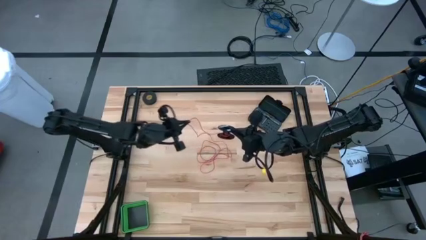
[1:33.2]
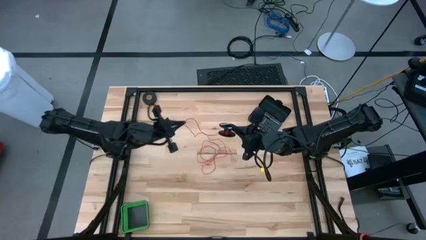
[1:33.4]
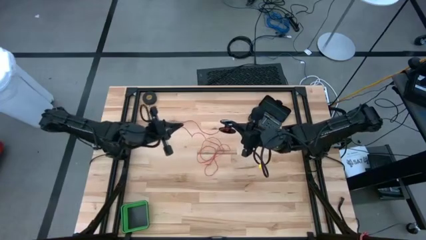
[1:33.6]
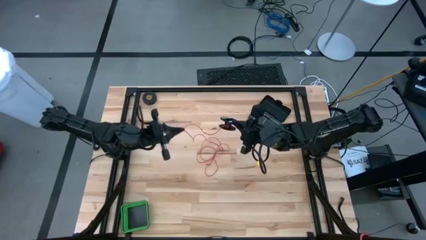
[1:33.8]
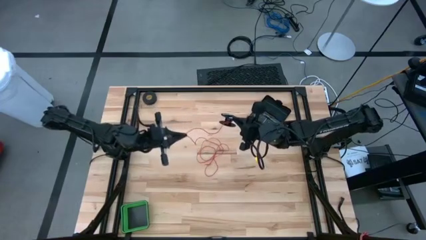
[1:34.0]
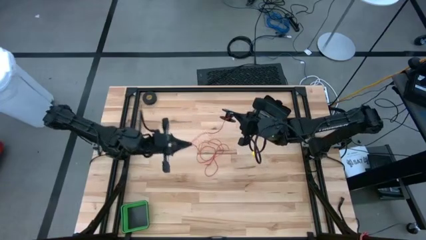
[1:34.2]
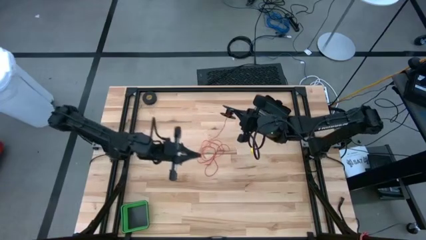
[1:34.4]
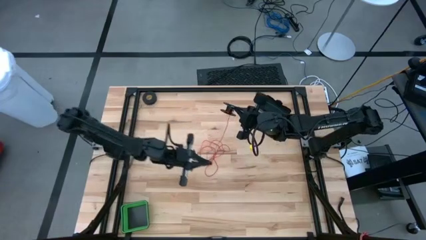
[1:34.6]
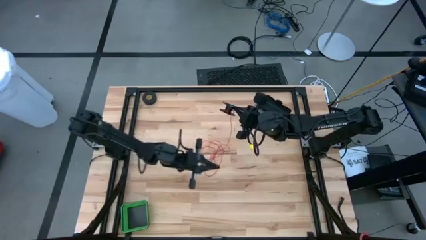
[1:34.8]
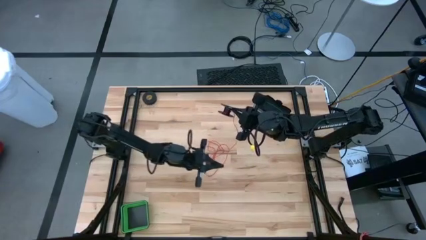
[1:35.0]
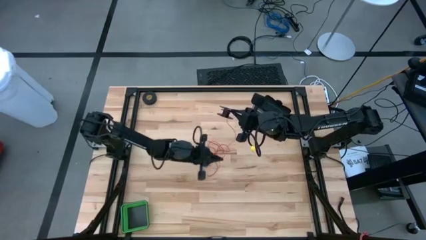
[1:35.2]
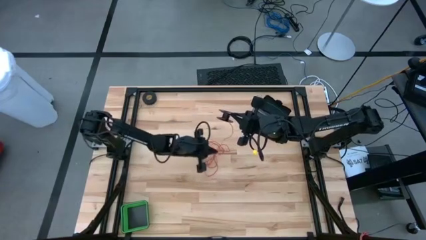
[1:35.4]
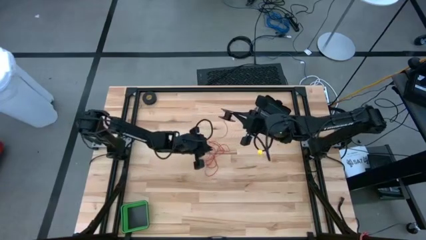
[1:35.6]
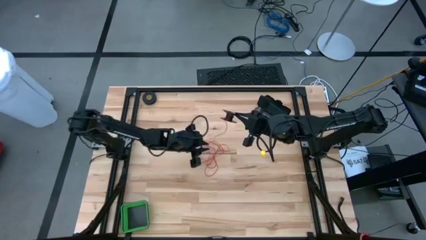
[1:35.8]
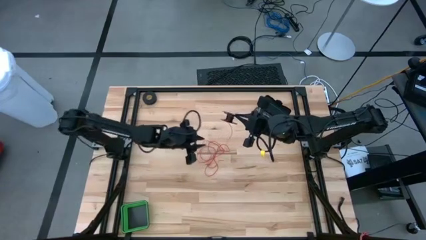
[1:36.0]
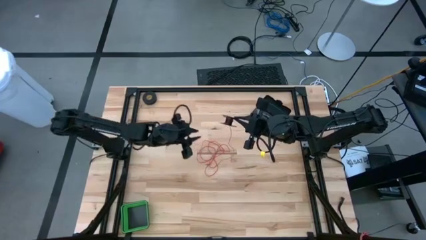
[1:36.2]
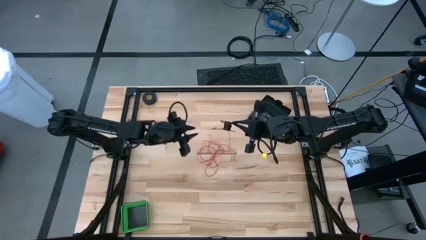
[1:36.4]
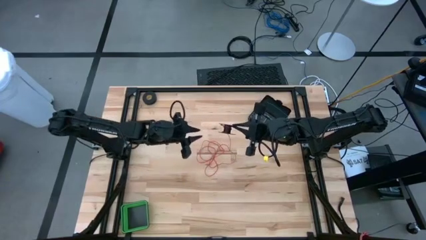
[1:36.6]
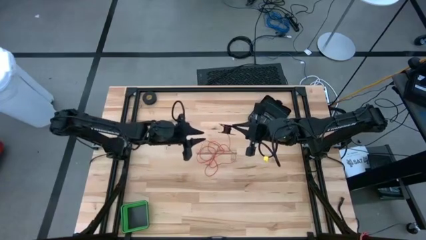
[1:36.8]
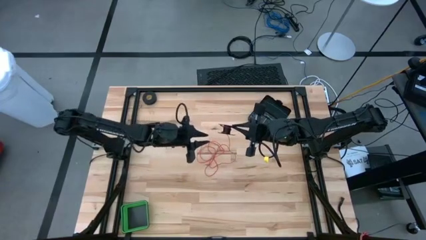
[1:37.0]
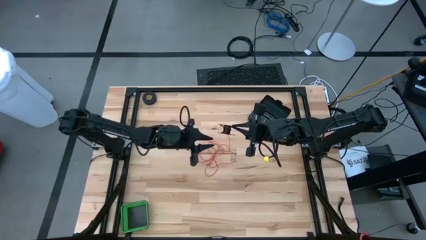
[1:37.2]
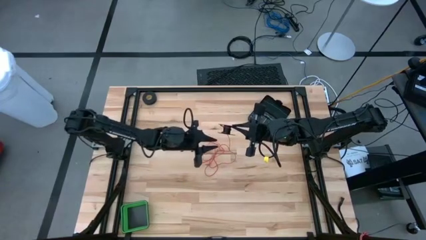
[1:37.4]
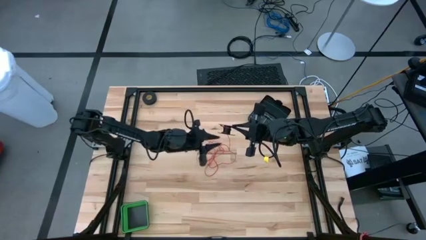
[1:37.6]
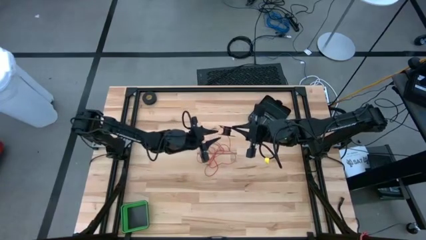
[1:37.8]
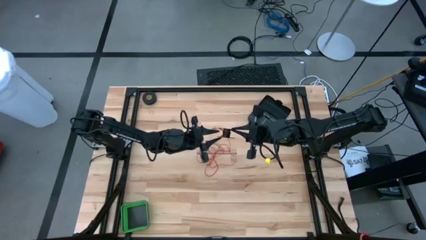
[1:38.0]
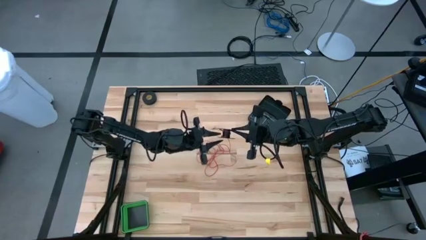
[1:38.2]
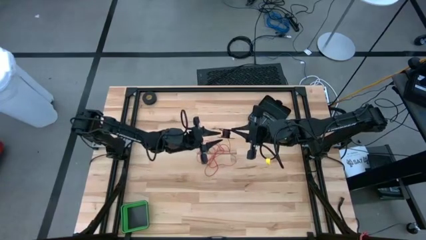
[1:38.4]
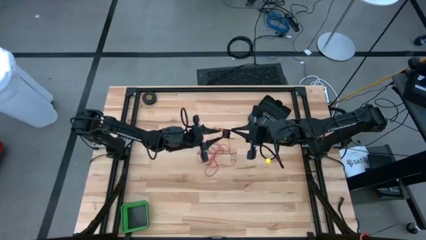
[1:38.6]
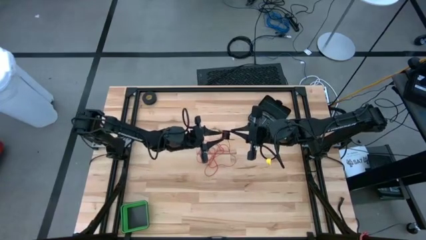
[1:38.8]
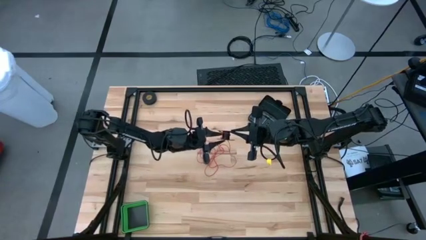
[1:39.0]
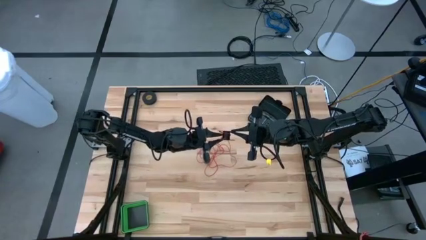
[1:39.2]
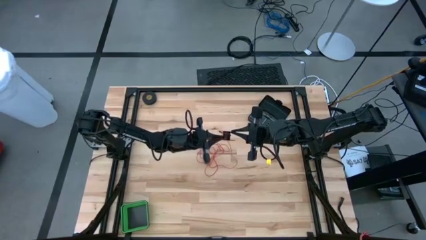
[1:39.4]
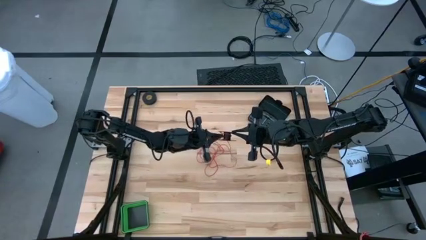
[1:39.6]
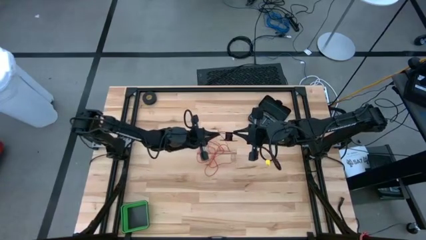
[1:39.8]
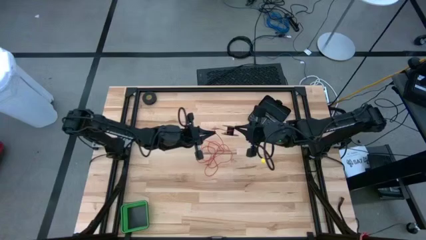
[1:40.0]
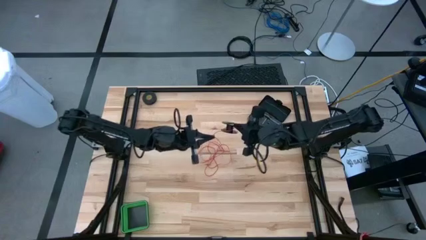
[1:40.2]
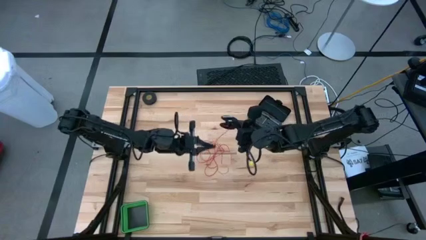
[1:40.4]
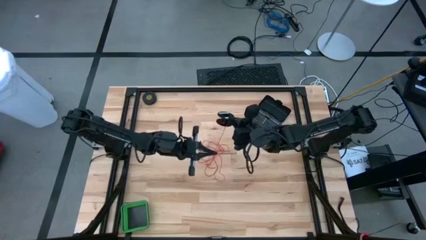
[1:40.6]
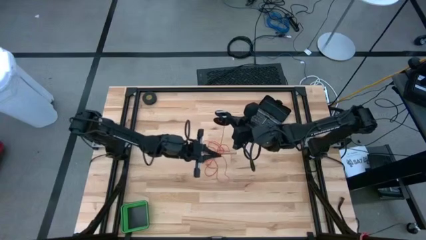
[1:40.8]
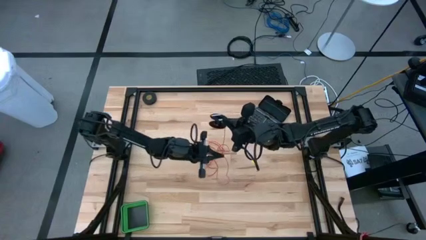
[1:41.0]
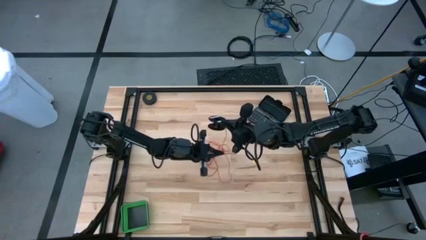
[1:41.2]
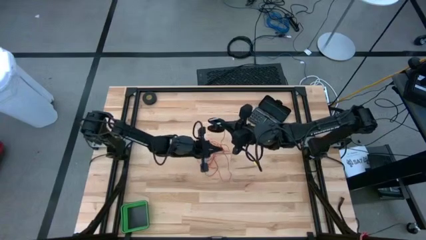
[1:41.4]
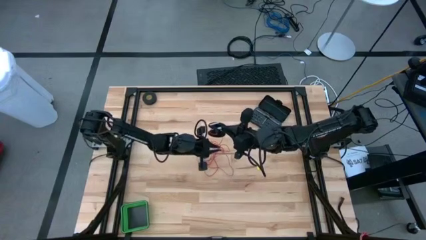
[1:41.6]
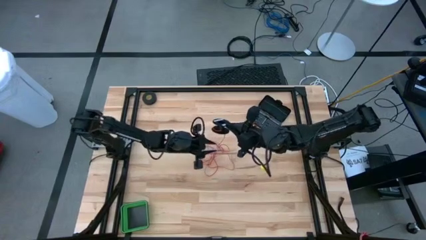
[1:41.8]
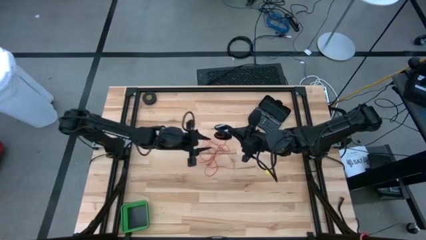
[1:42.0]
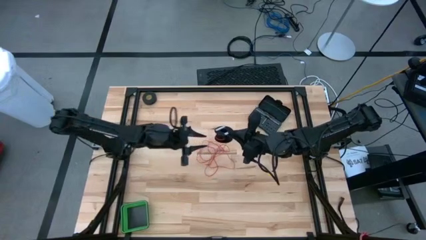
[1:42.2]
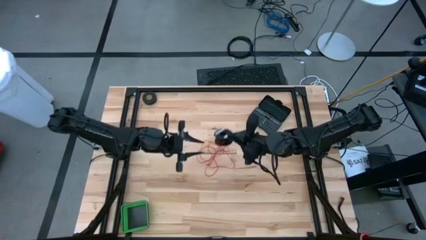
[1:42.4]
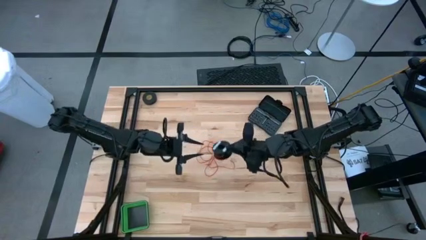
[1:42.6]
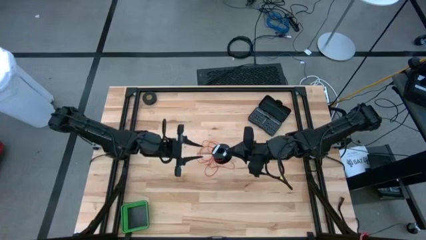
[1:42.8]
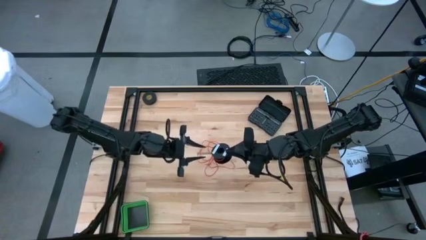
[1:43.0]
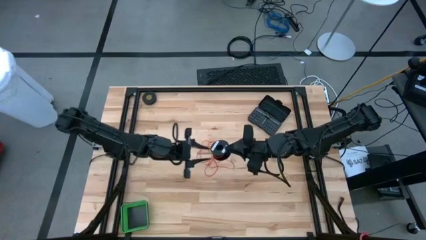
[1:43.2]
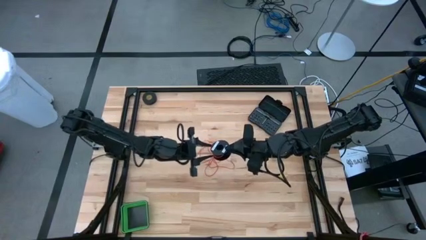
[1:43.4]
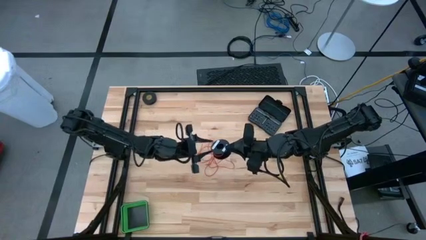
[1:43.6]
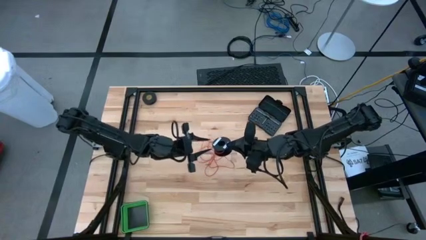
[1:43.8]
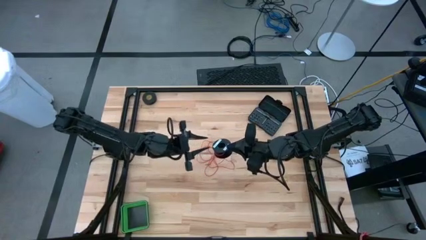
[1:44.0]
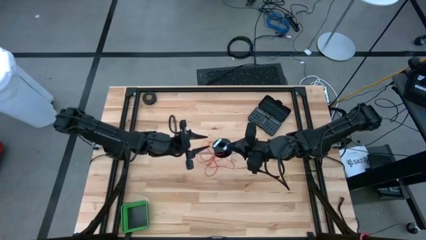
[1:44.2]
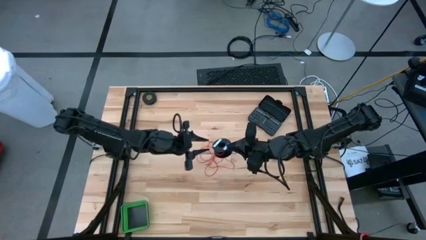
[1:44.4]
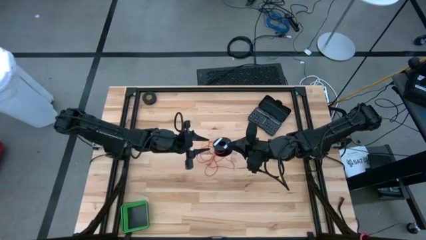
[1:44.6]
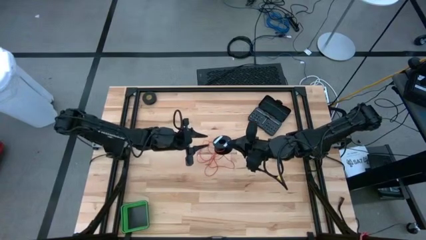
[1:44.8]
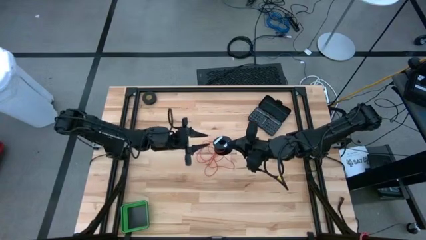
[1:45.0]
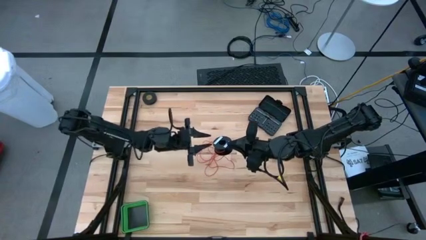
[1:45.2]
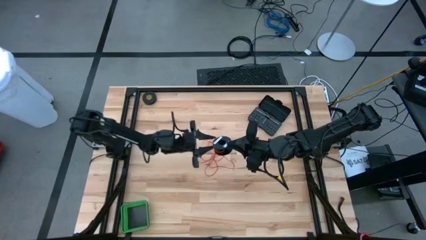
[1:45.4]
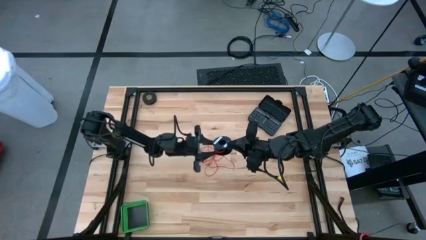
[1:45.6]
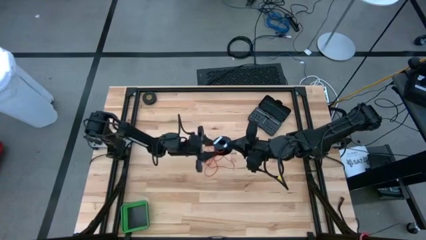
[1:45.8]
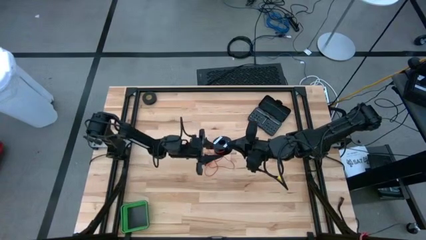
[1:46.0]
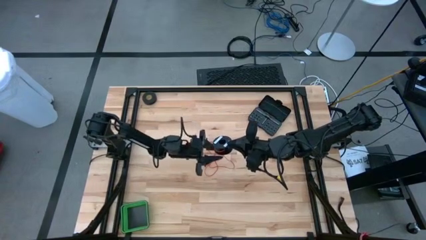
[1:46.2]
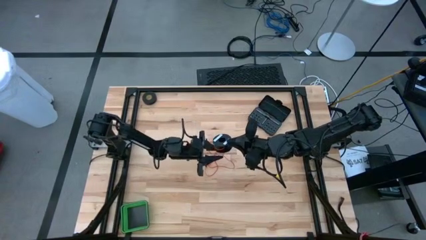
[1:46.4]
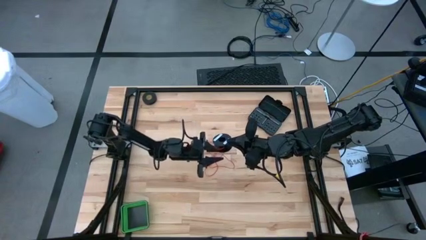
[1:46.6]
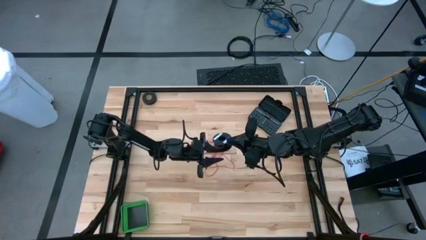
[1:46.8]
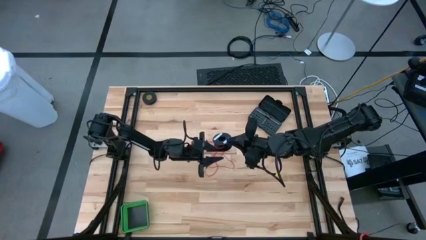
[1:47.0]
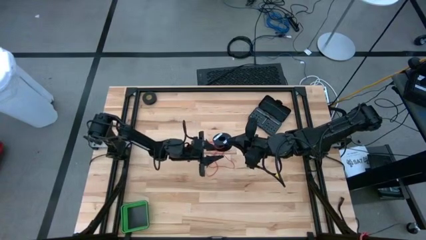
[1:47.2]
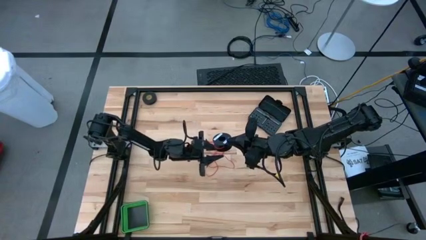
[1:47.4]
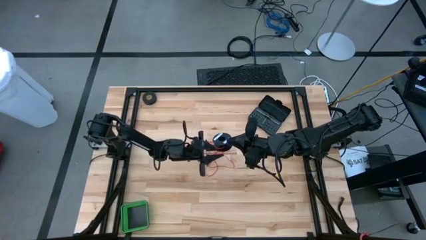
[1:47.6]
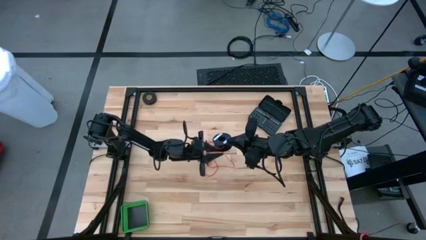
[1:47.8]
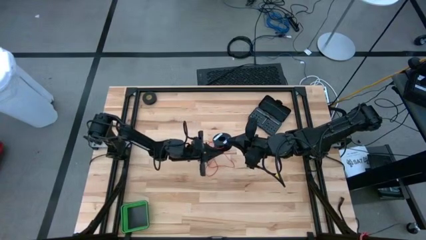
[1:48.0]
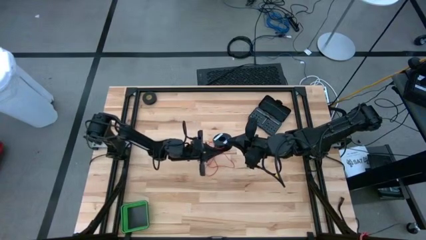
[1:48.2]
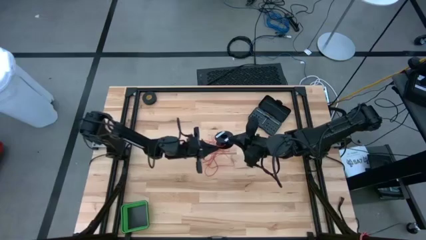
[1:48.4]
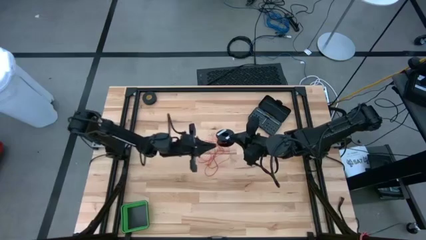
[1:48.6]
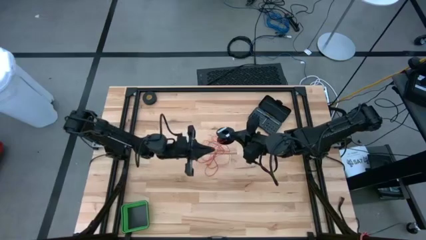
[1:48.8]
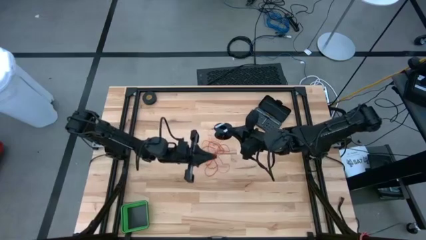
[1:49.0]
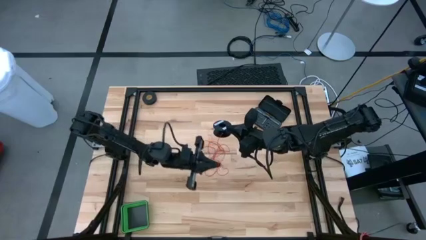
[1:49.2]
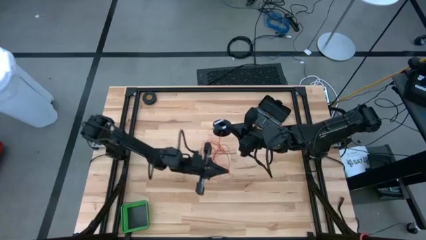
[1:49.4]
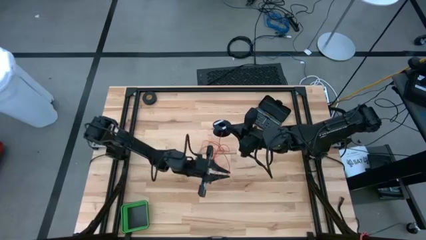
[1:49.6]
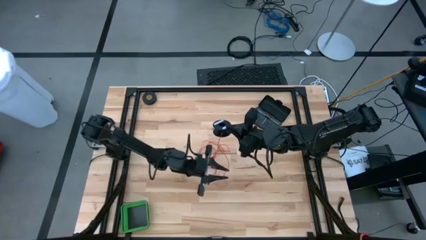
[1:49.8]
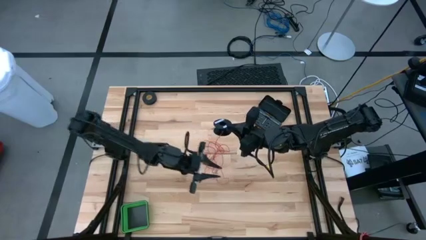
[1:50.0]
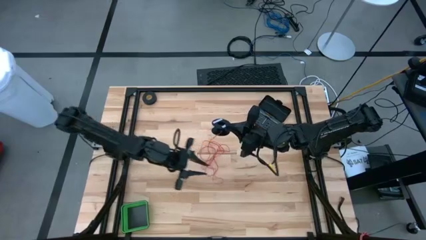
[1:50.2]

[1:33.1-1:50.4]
Task: Coil cords
Uncoil the red wire from the spool
